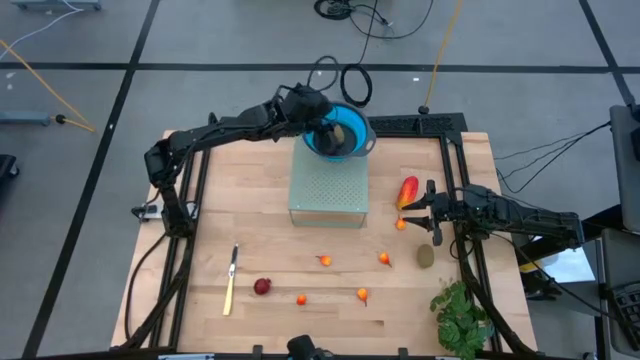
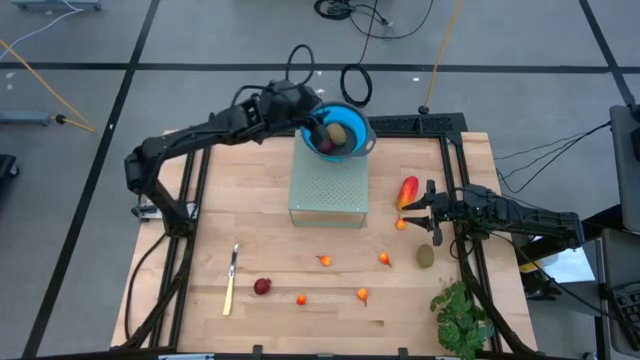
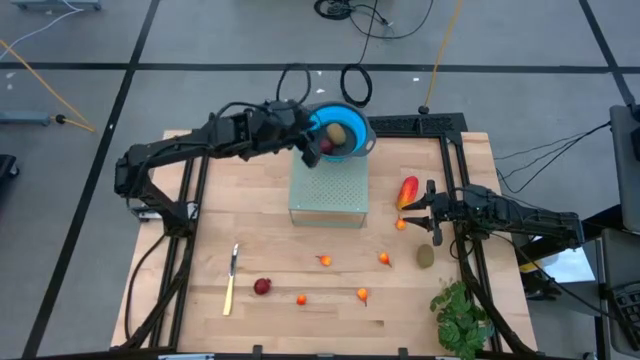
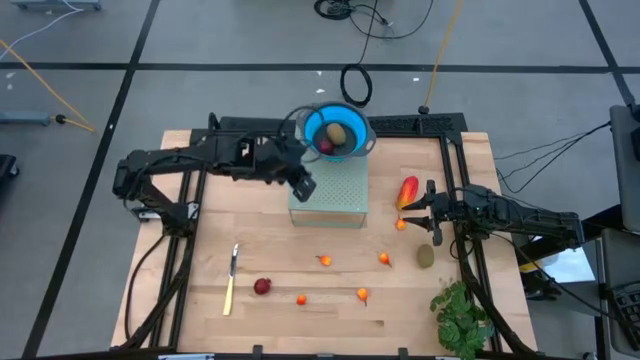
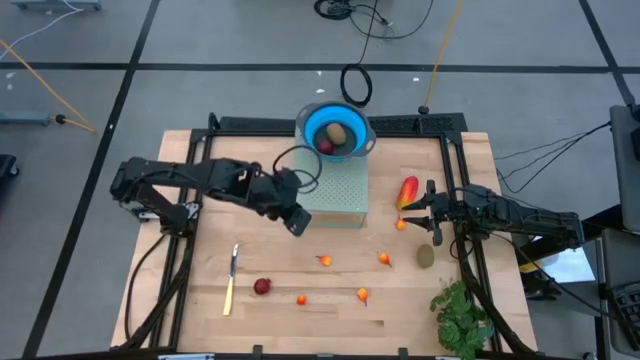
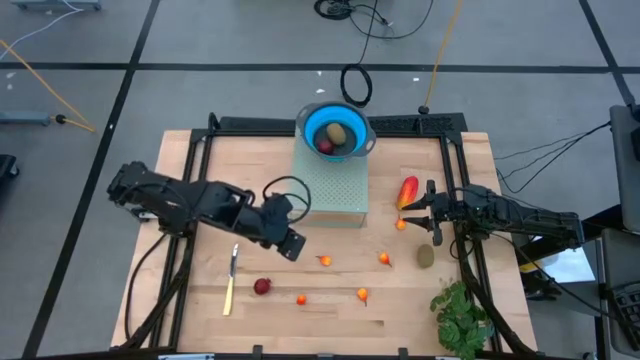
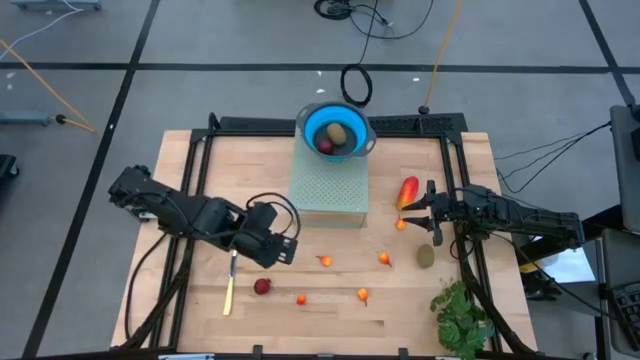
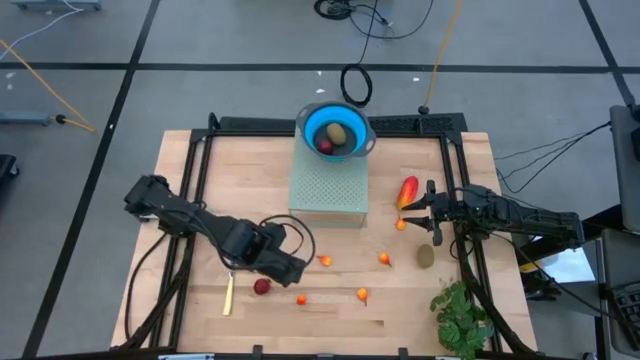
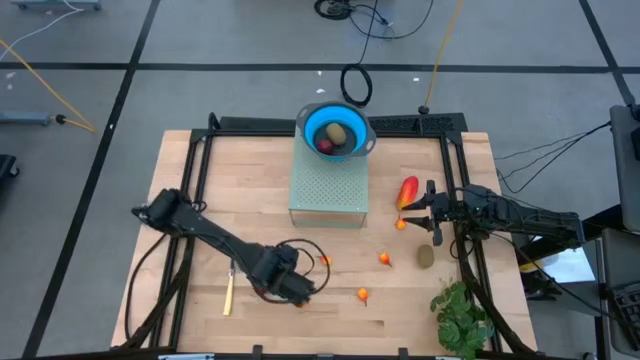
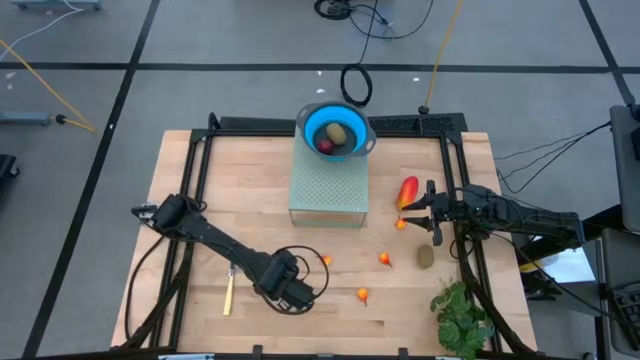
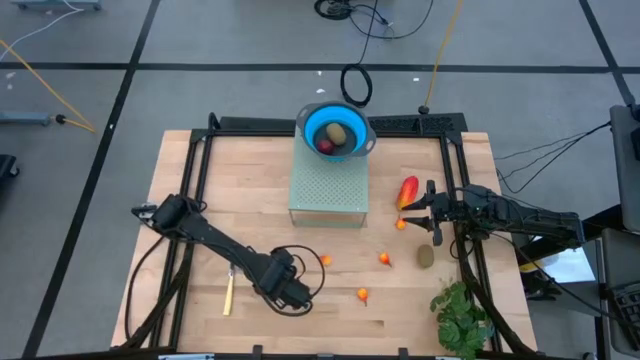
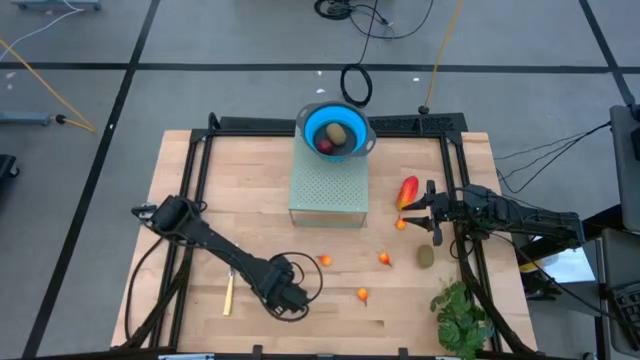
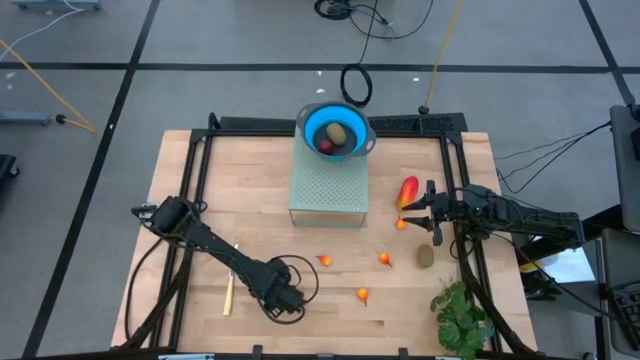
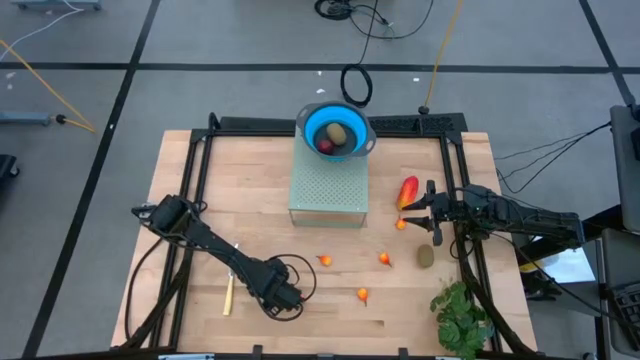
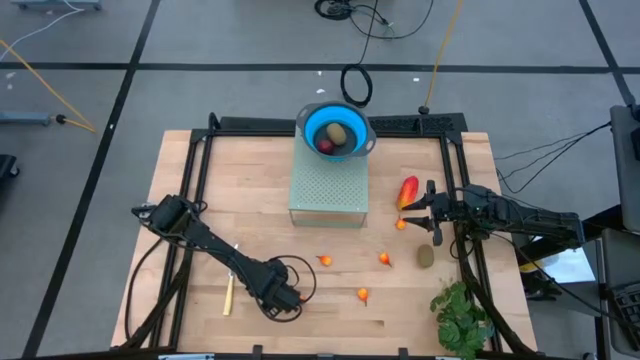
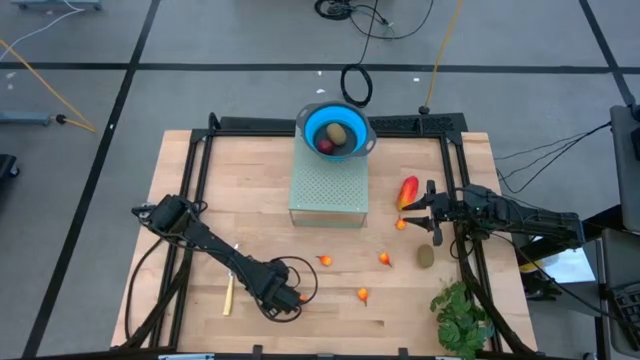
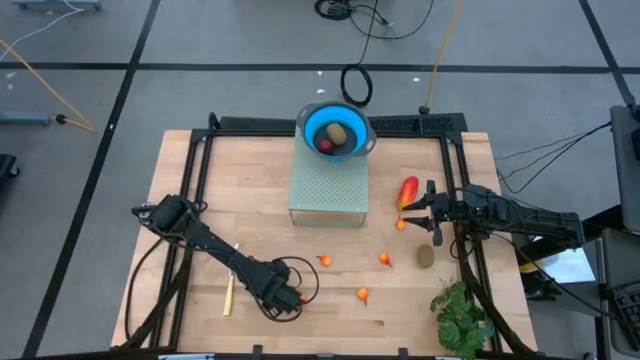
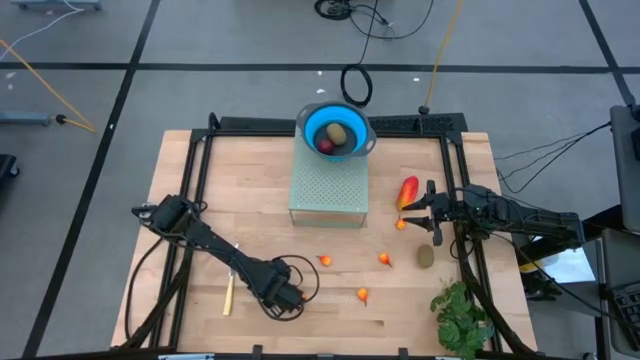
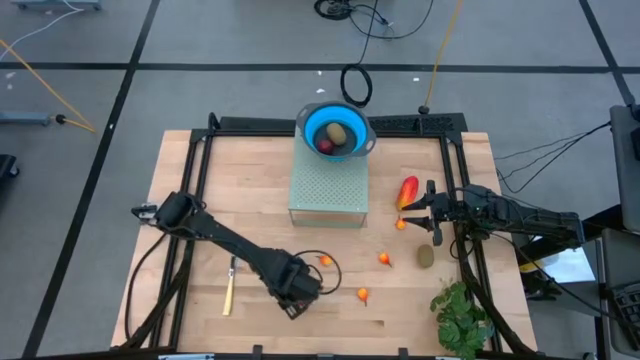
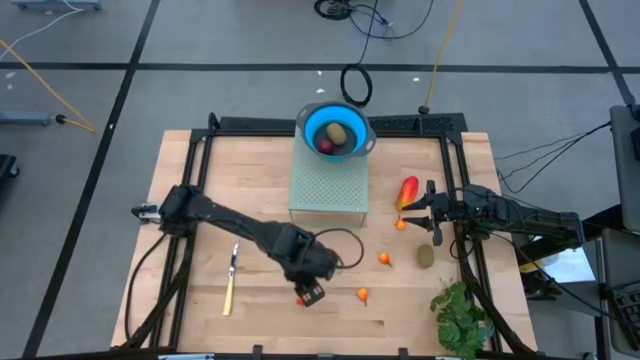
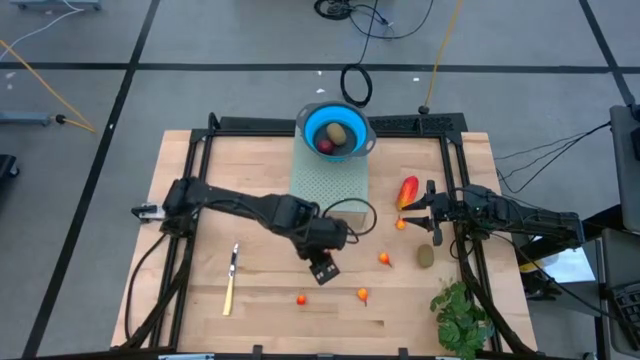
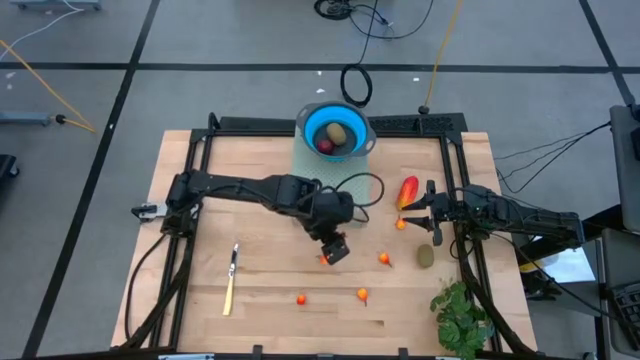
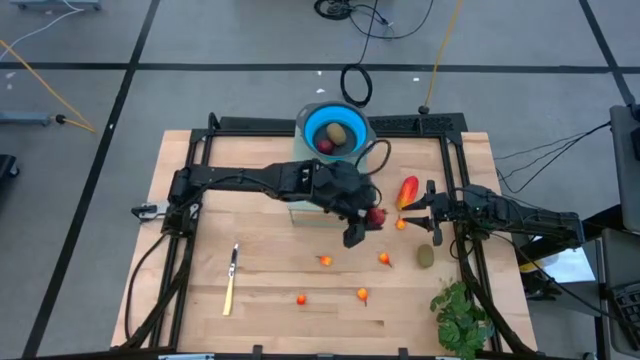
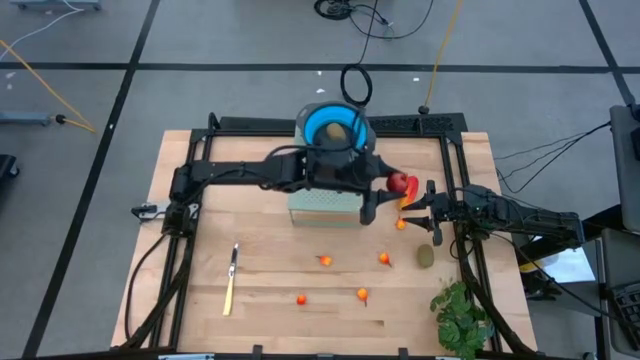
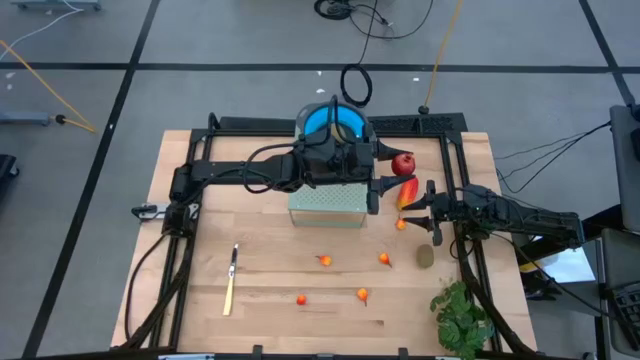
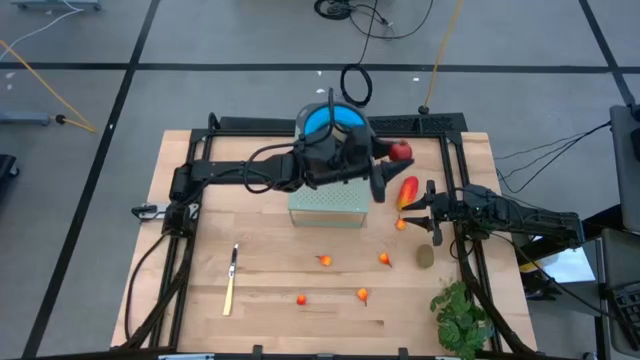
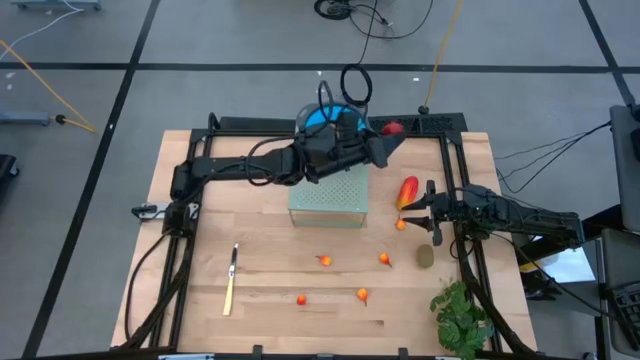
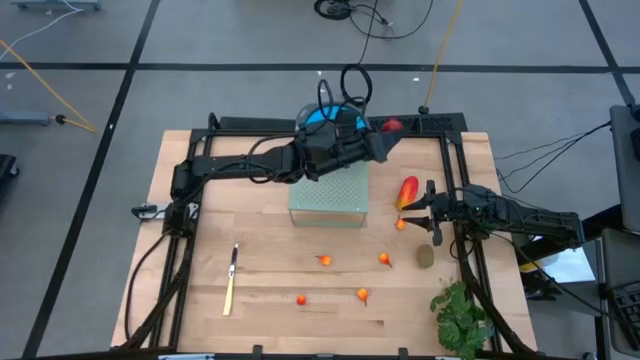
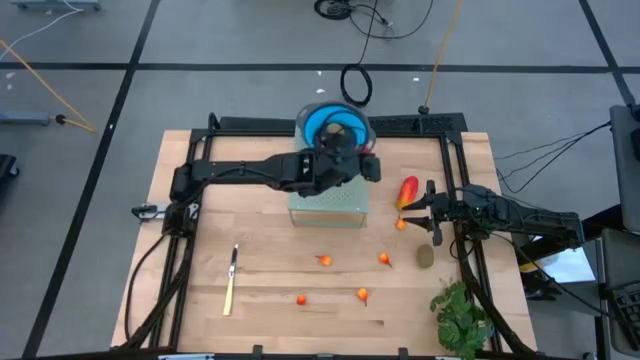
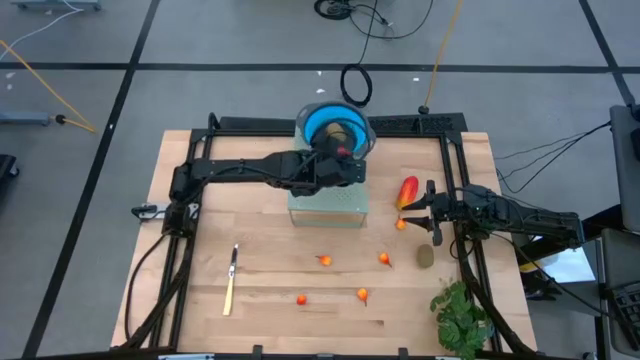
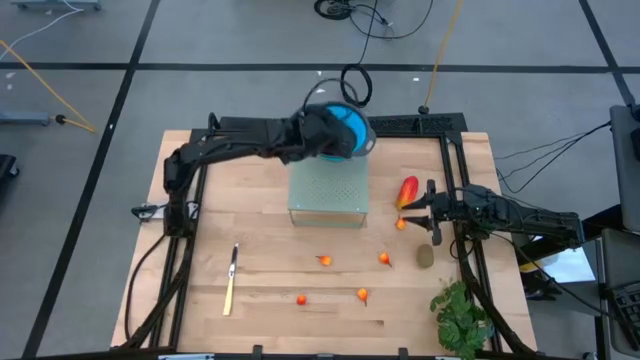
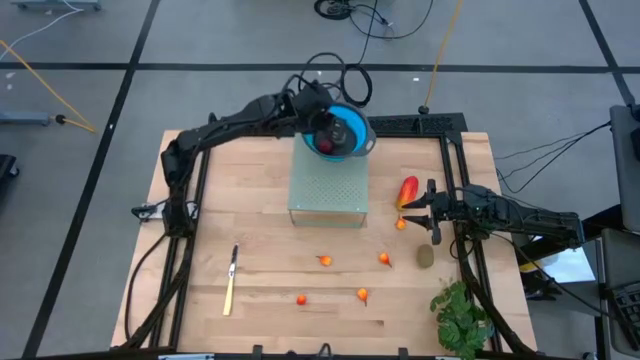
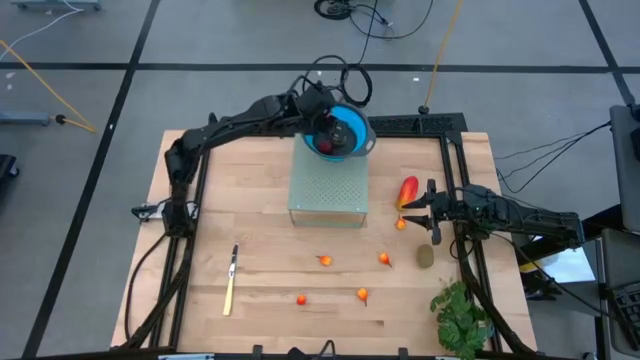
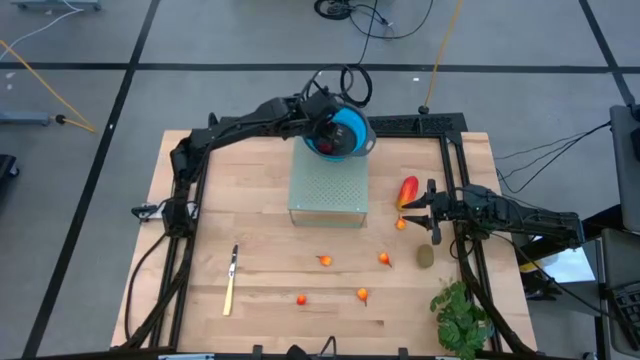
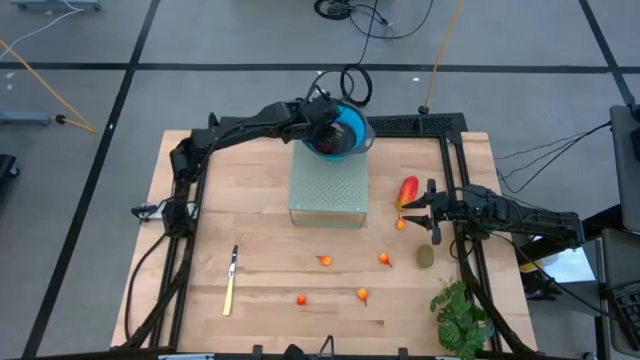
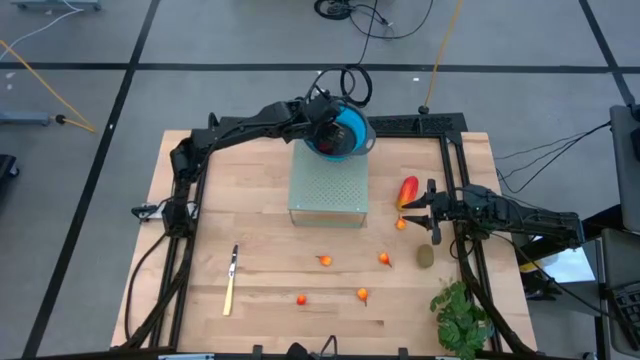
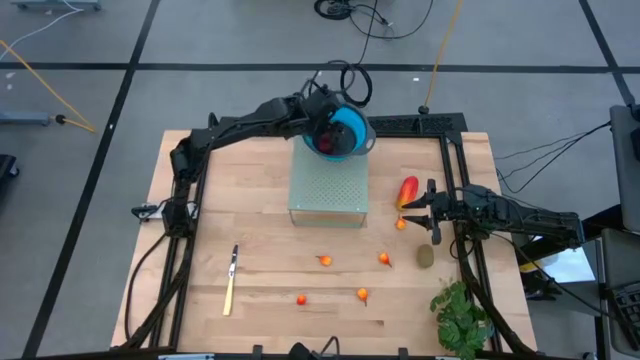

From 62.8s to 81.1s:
Task: Pick & Place Fruit
Put the pomegranate into the blue strainer bowl on the shelf

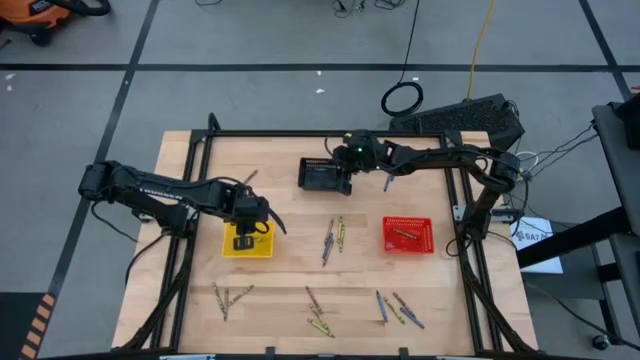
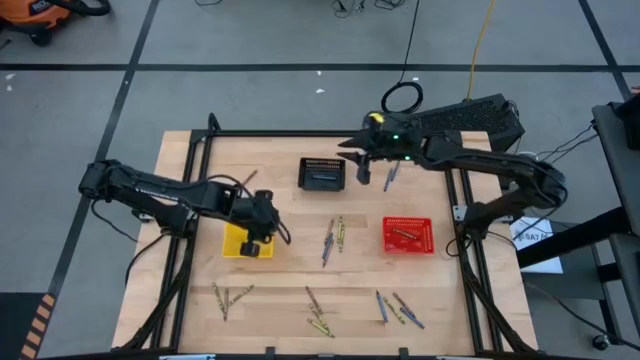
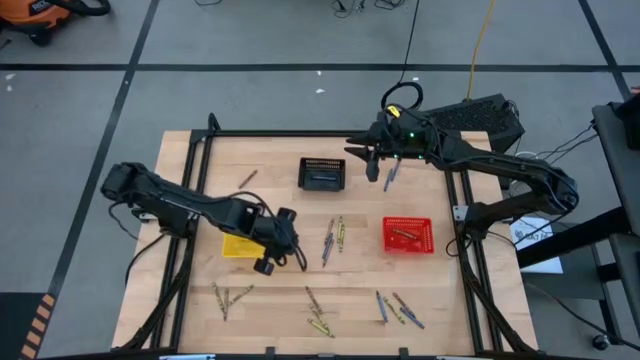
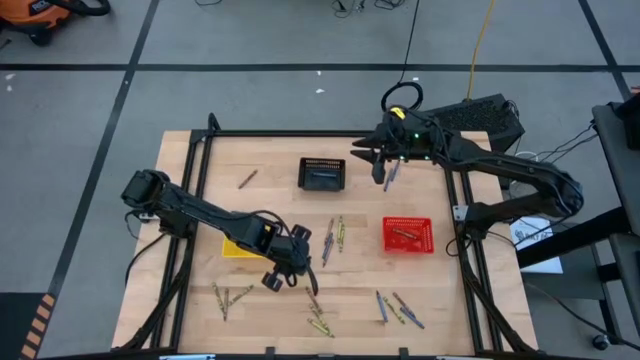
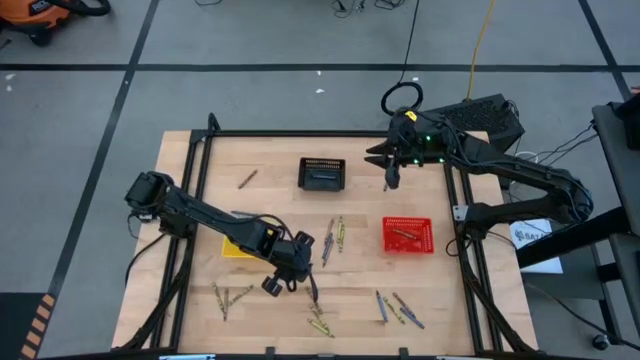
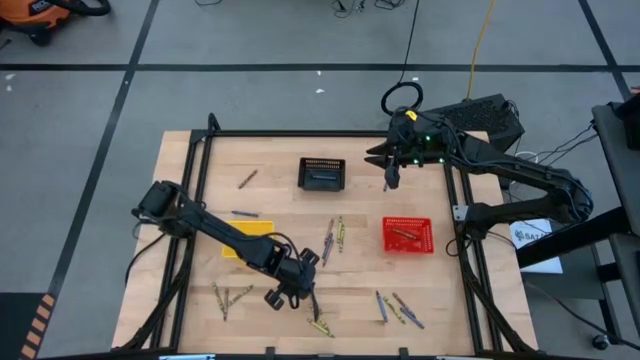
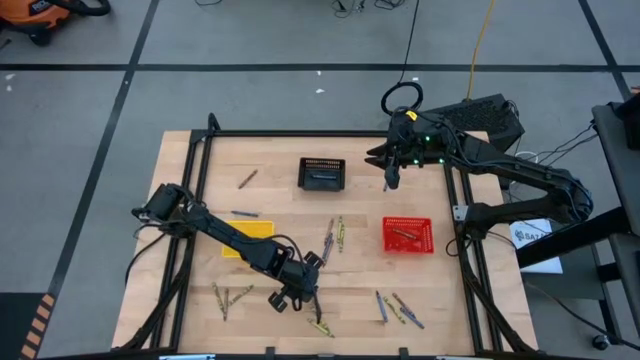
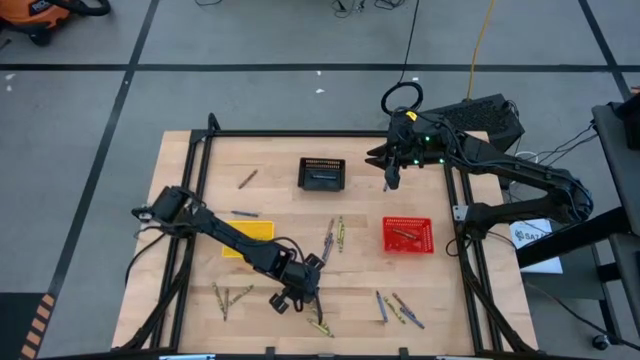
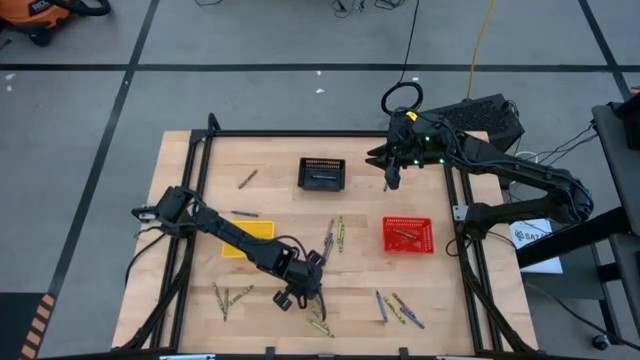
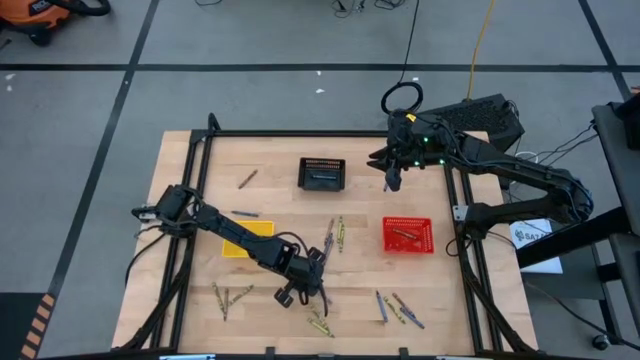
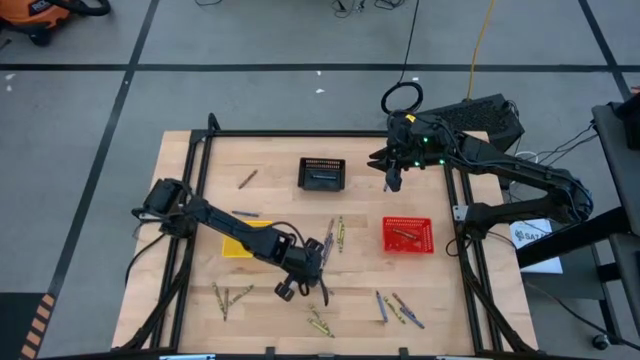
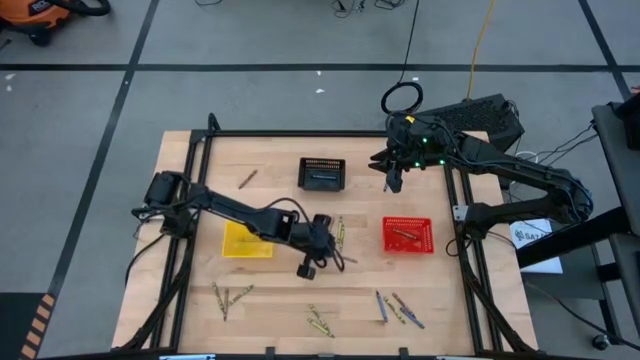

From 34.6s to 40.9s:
Task: Sort crayons
Put the brown crayon into the red bin
